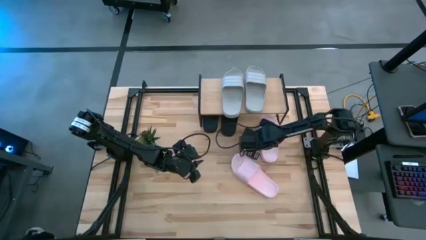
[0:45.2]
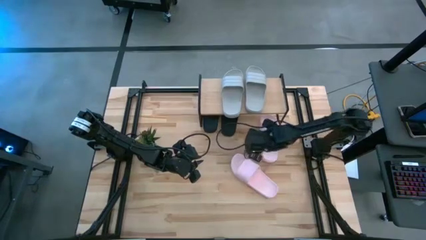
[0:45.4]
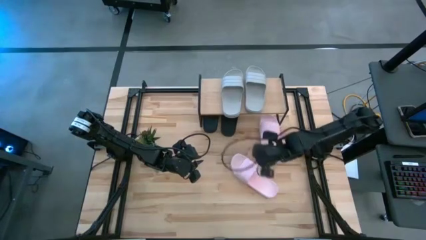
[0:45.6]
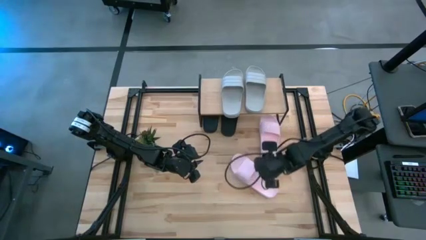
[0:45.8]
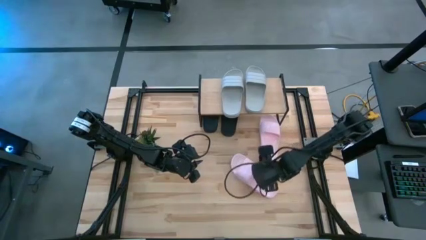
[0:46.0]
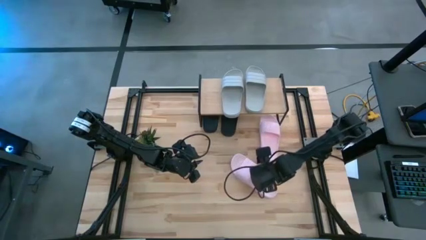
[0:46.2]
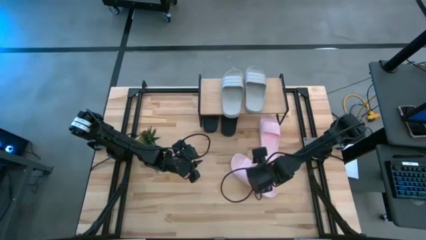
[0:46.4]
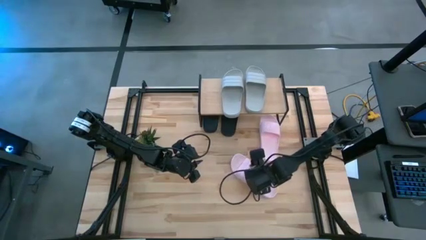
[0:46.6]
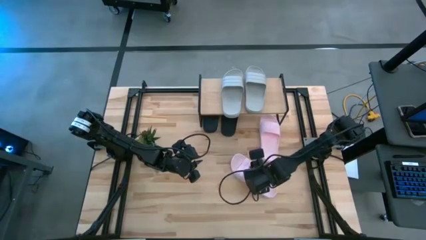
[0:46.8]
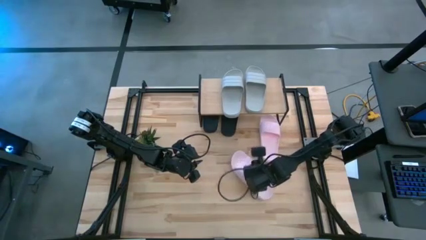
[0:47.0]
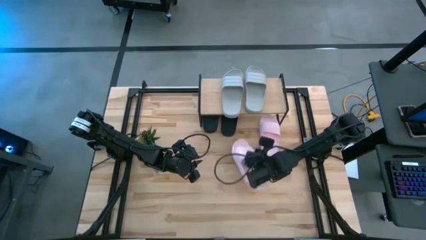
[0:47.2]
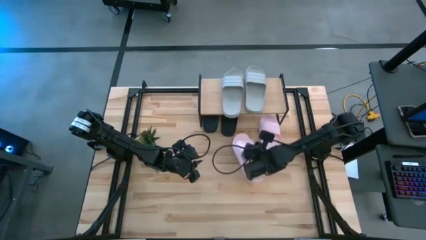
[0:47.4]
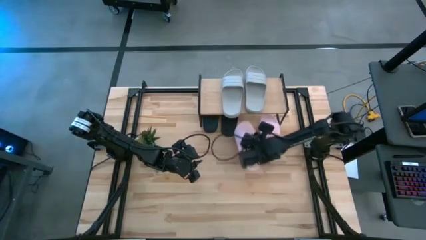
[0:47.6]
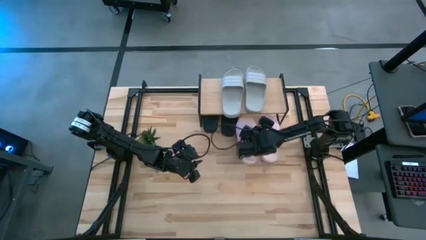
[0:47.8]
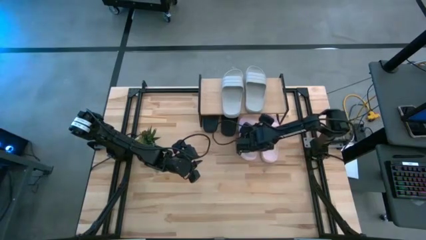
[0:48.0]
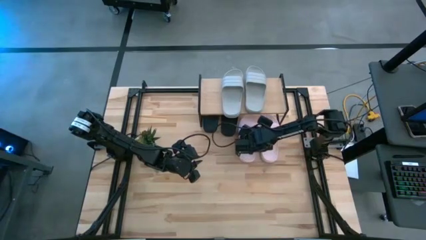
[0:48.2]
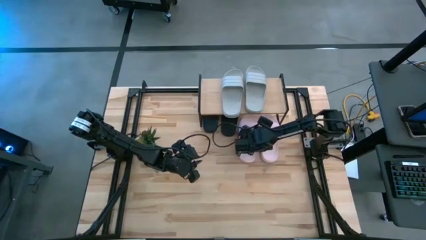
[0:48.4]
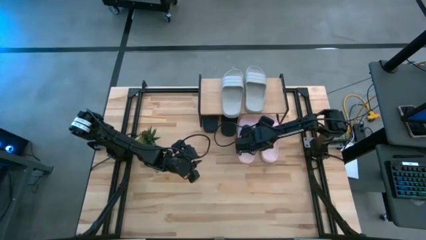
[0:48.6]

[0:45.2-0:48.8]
Task: Pick and place slides into the shelf
Move the pink left slipper to the top right of the table

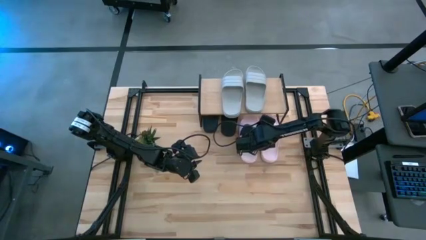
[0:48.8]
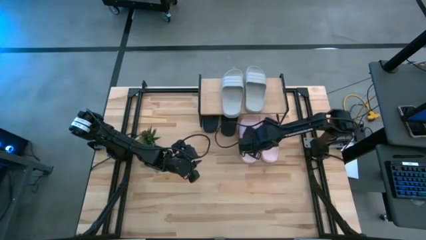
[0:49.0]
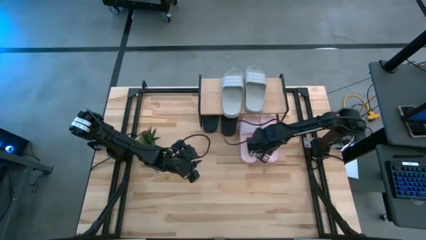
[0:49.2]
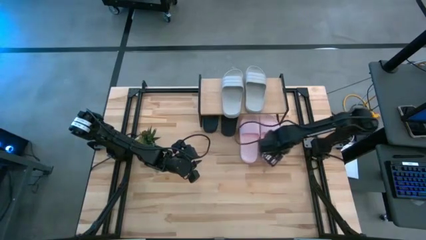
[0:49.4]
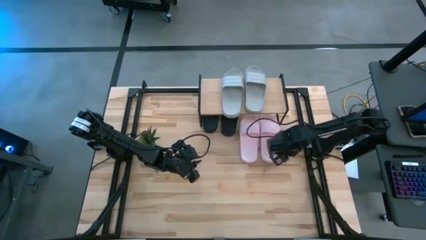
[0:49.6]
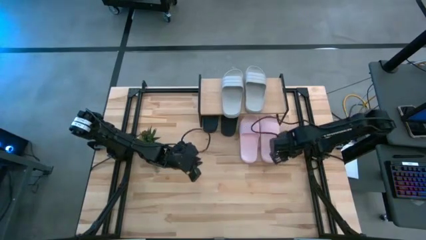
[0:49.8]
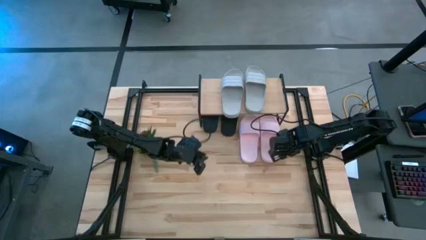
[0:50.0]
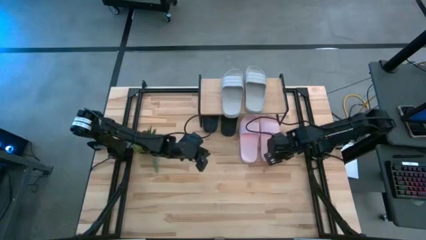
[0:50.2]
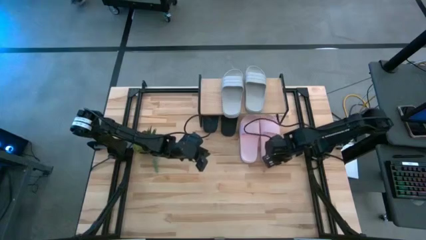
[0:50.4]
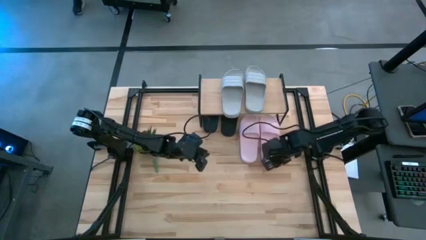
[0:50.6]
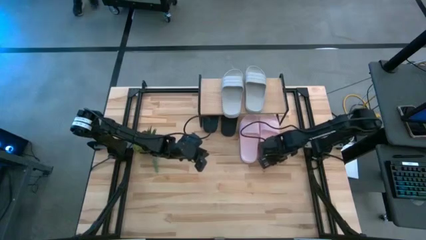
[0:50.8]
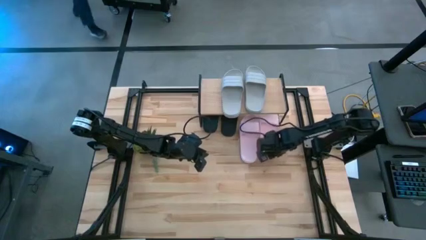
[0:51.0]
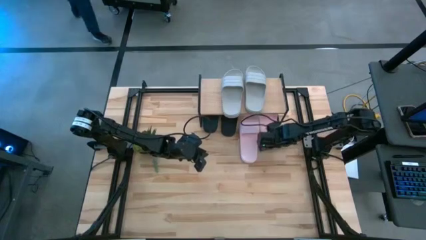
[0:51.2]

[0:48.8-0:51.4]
Adjust the pink right slipper under the shelf

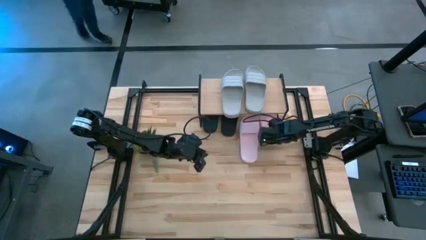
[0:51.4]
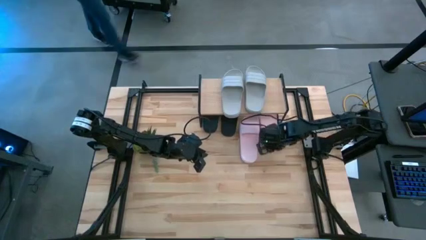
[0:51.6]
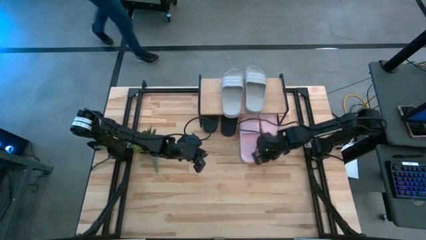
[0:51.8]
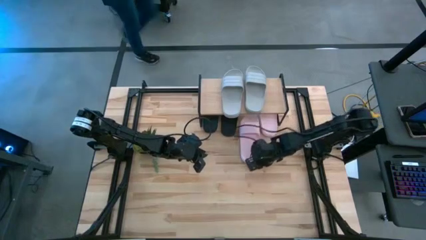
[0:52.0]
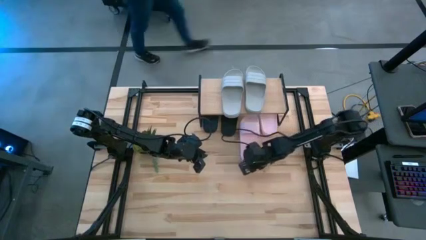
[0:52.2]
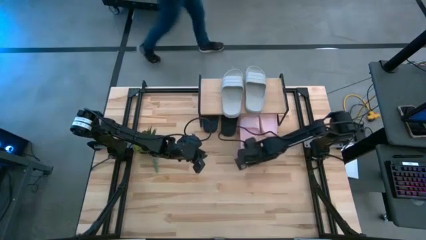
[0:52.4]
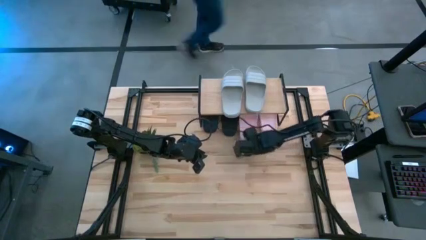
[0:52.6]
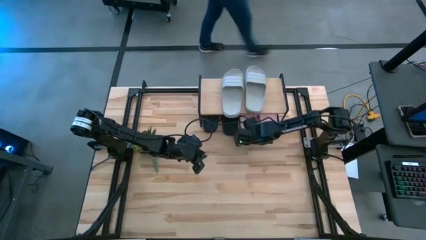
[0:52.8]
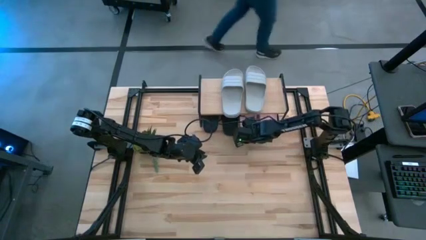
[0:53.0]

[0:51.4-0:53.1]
Adjust the pink left slipper under the shelf

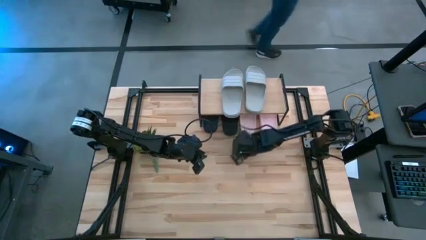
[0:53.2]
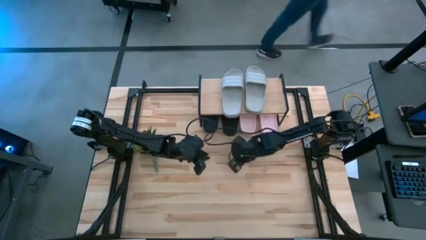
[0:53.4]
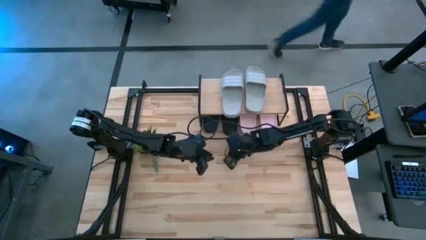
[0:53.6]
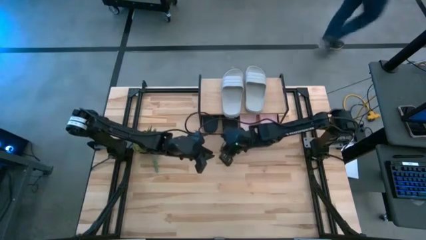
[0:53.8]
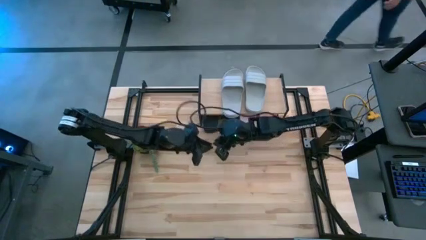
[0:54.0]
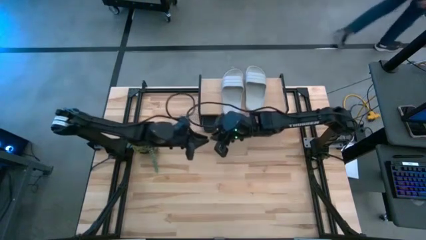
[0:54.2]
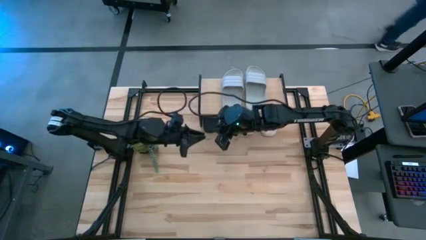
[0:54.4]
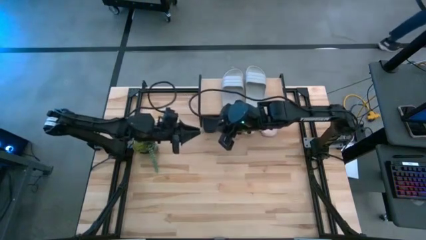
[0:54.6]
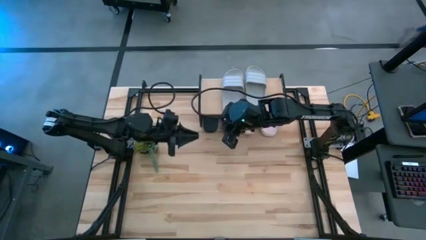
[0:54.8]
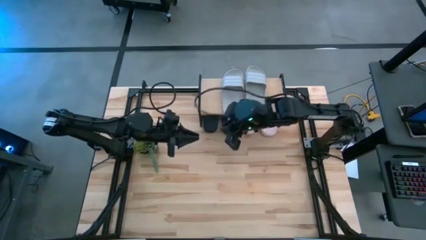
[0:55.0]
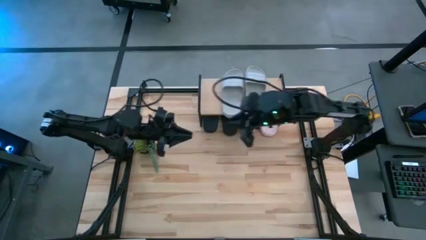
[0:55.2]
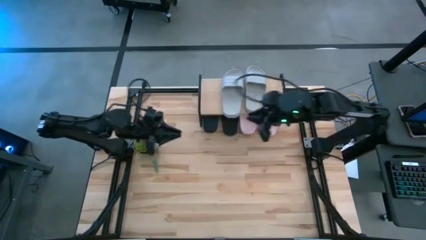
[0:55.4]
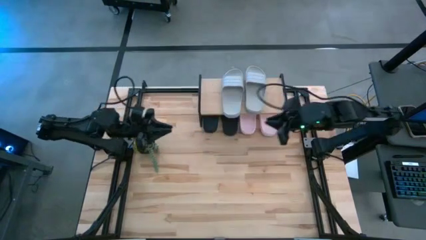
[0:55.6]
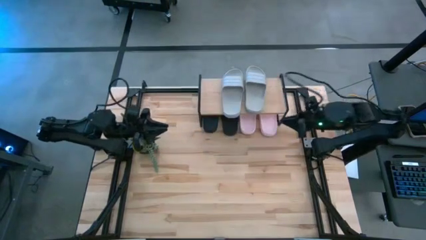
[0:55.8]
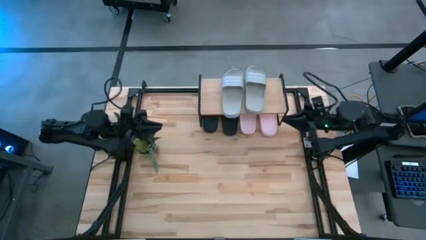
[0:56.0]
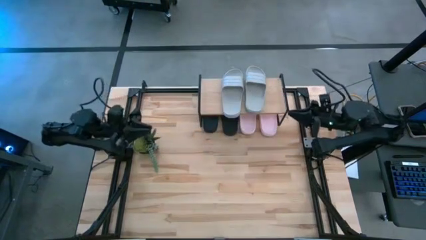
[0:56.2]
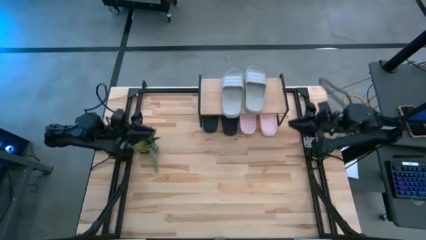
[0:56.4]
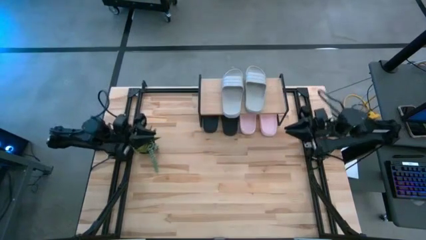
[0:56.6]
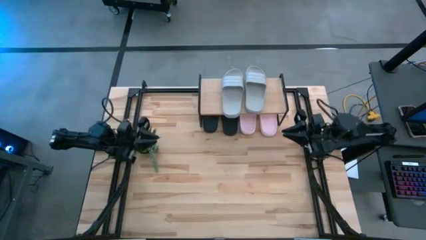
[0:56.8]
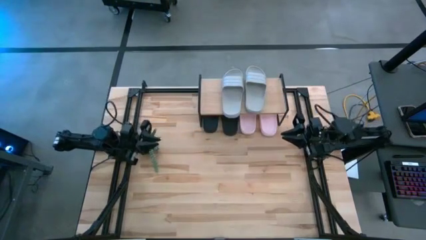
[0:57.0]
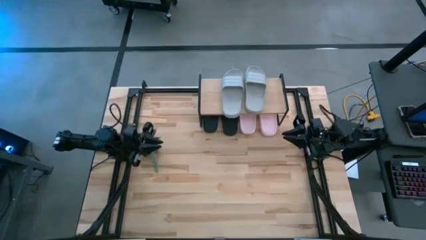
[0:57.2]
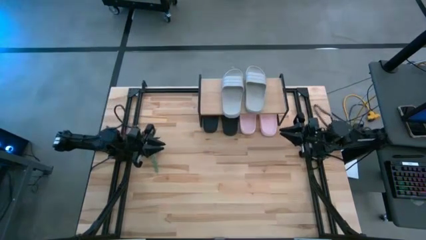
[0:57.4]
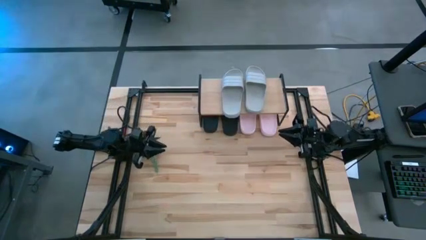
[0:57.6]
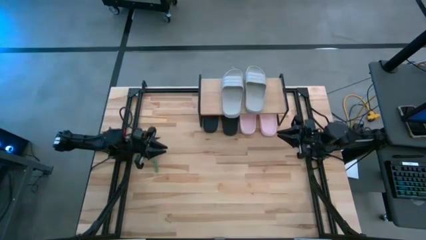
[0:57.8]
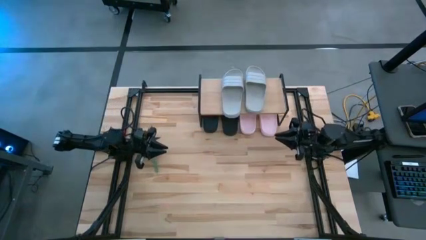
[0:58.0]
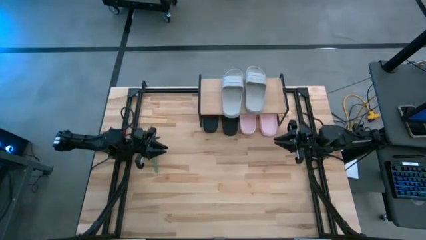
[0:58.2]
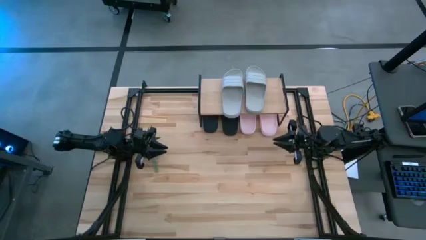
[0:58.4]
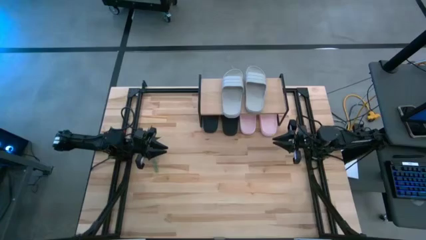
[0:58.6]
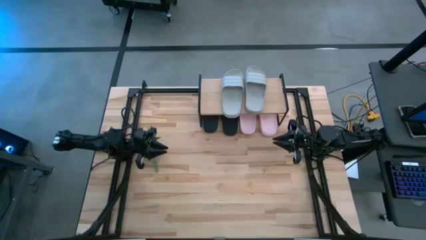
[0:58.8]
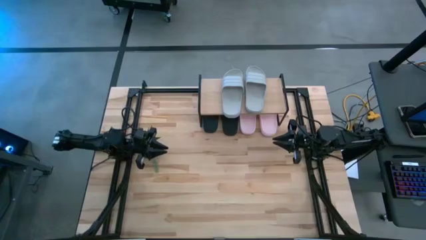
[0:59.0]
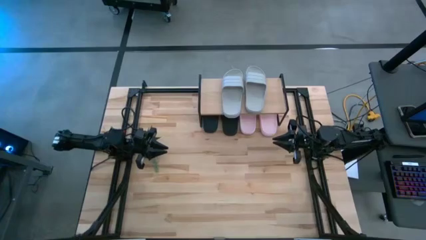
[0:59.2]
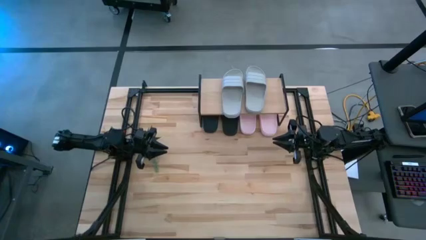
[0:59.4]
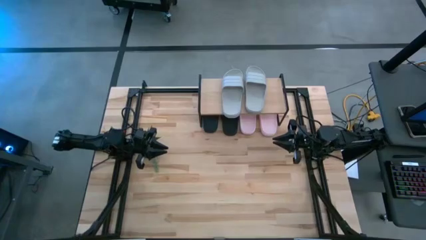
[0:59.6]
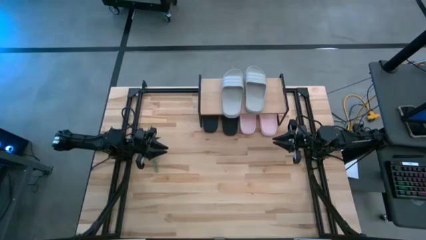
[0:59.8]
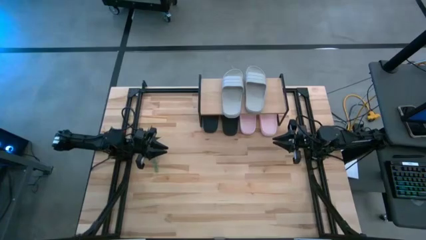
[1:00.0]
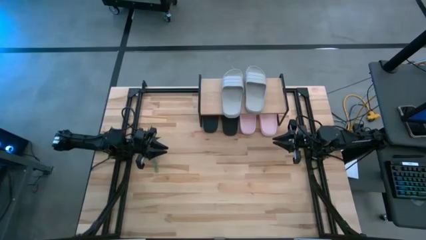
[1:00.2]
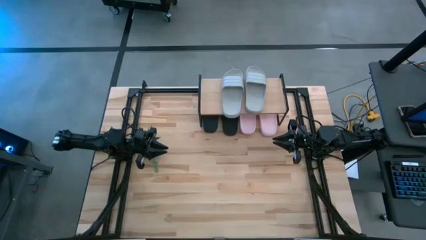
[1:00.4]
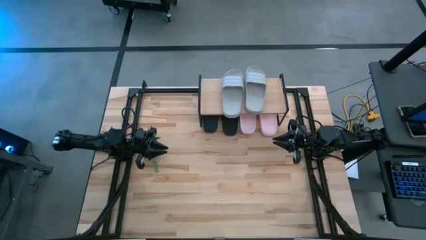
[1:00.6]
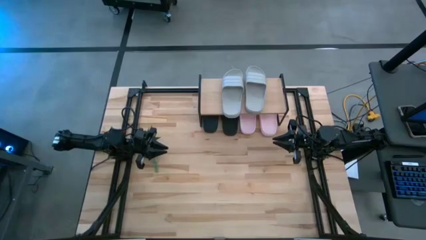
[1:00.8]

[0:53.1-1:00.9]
Return to Home Position
